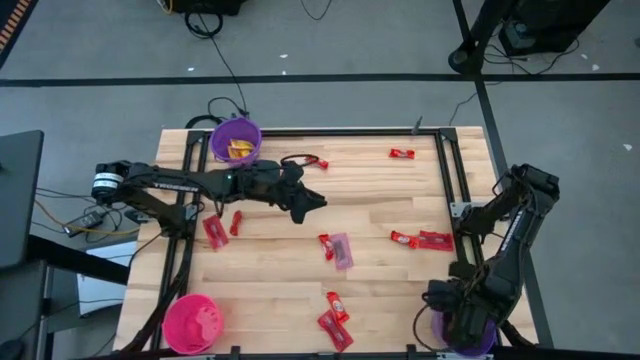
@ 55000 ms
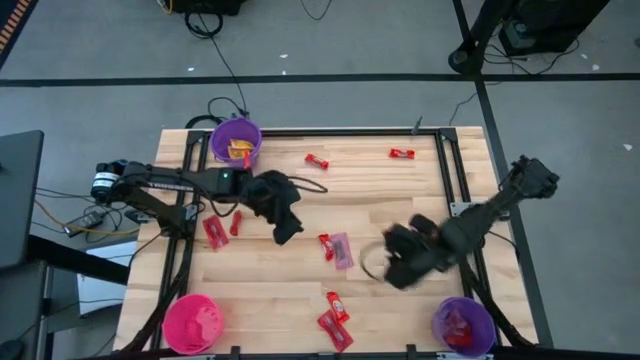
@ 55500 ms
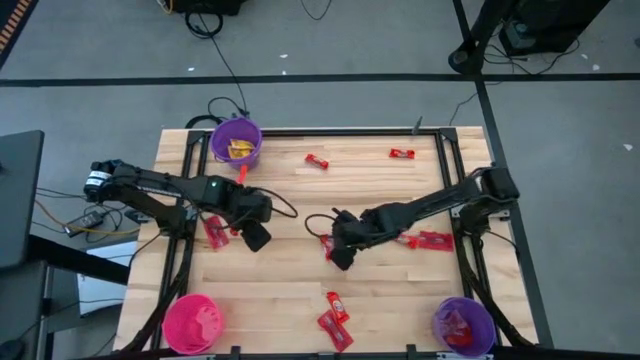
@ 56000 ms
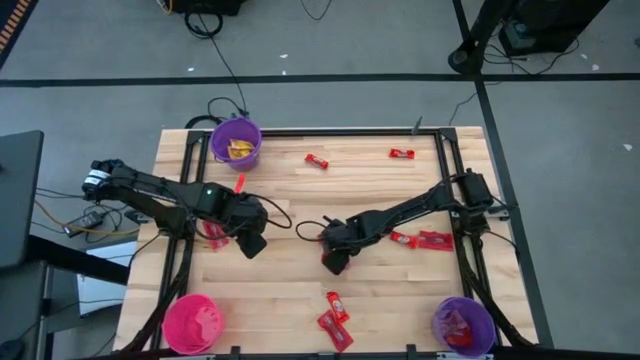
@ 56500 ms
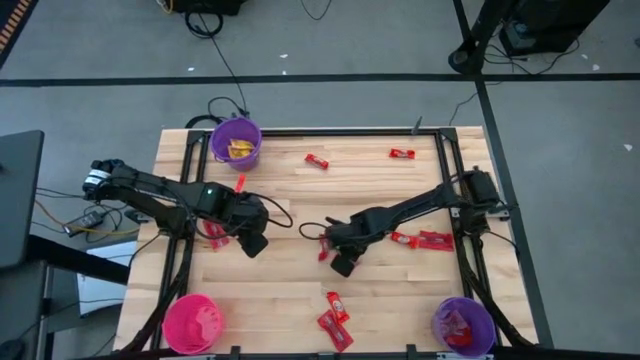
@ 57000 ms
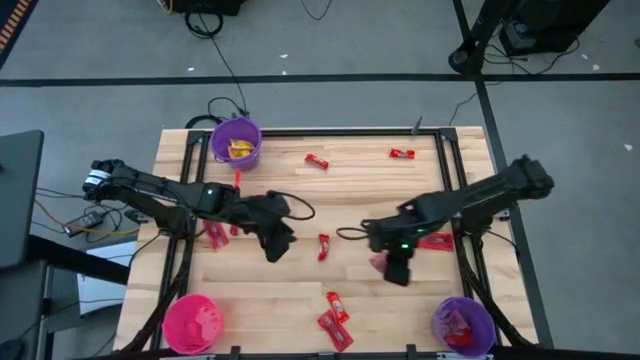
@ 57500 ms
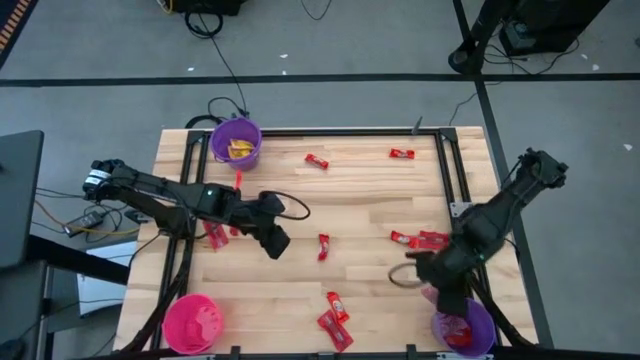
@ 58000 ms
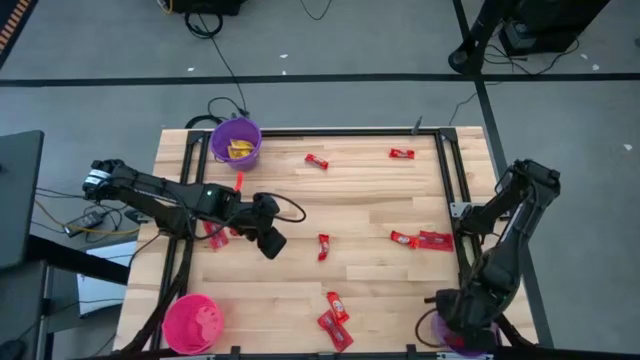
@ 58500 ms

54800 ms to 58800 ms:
Task: Sort candy by brand, put in halloween buckets
Put the red candy into the bottom purple bucket

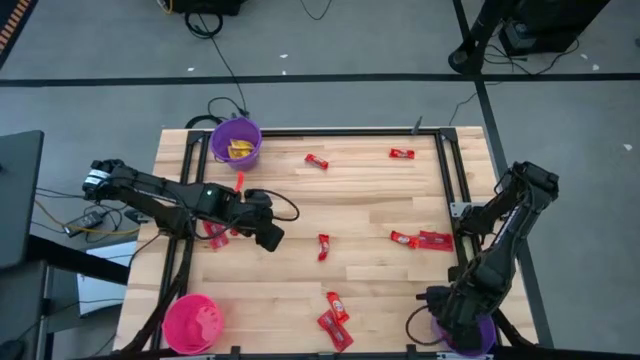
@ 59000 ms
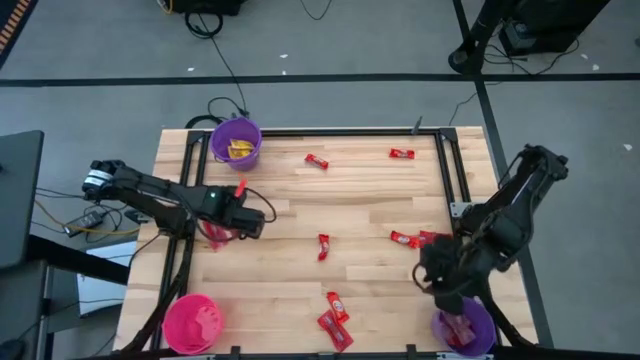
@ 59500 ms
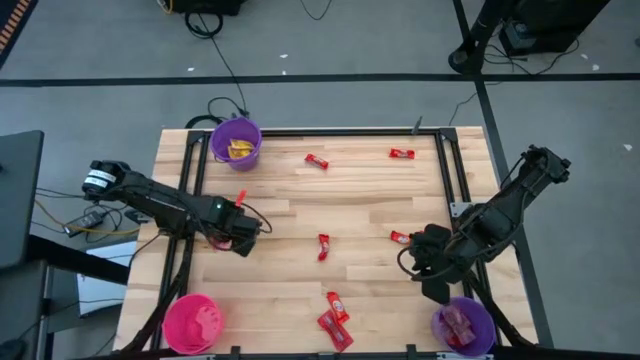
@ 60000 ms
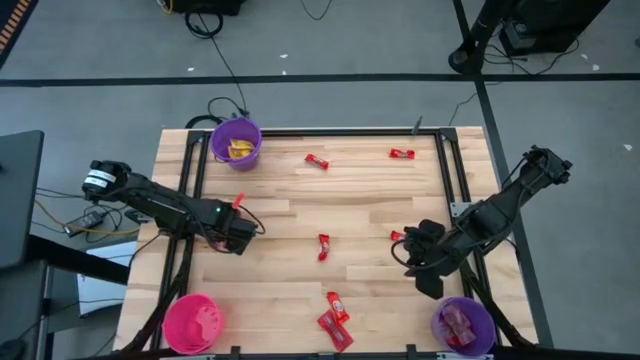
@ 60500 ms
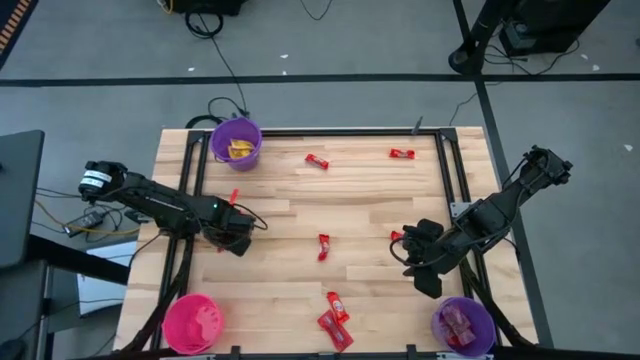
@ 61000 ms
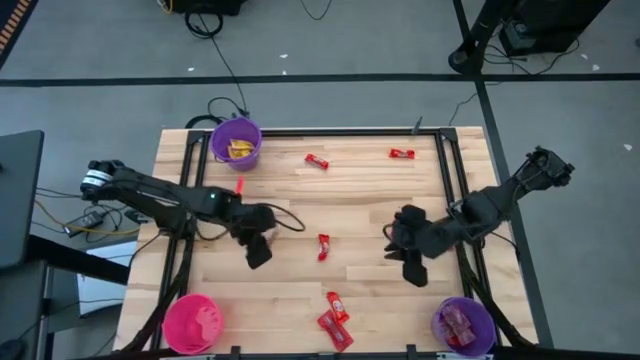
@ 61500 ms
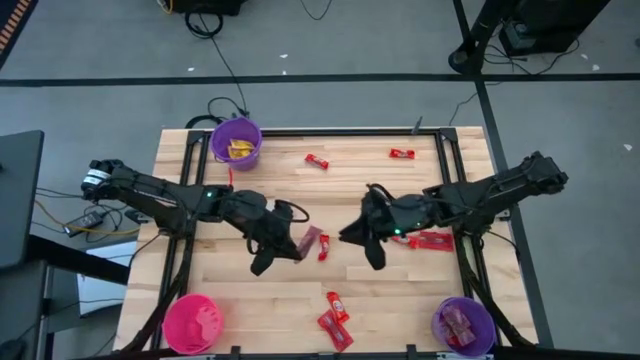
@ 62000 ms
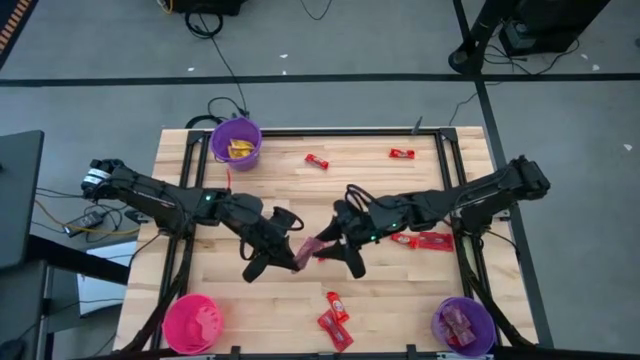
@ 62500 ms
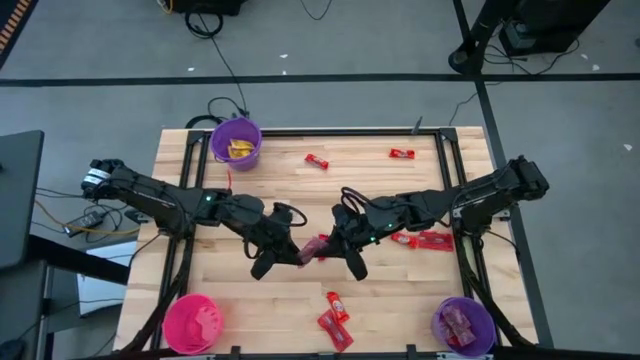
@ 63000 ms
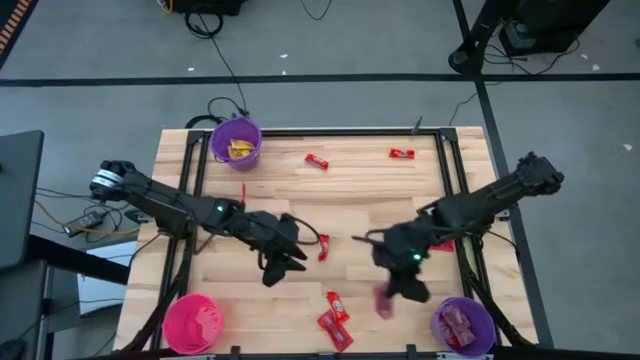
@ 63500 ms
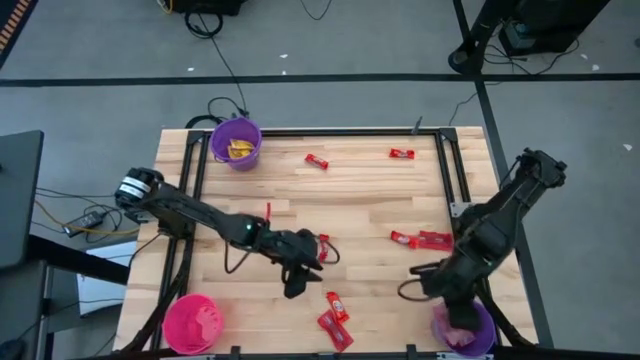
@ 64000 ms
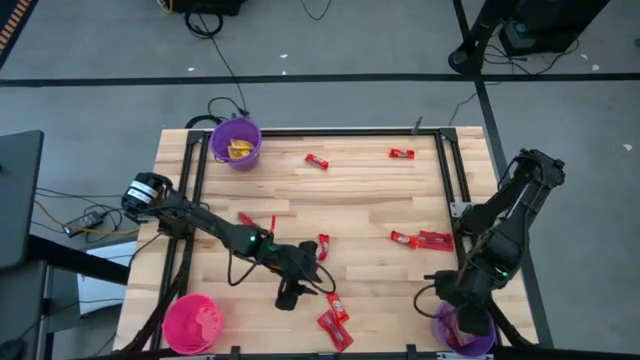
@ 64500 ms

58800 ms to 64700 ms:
Put the red candy into the bottom purple bucket

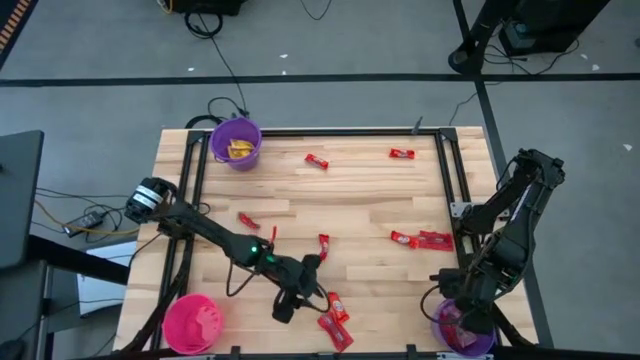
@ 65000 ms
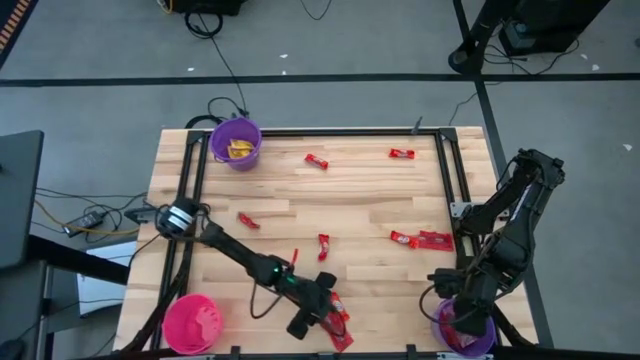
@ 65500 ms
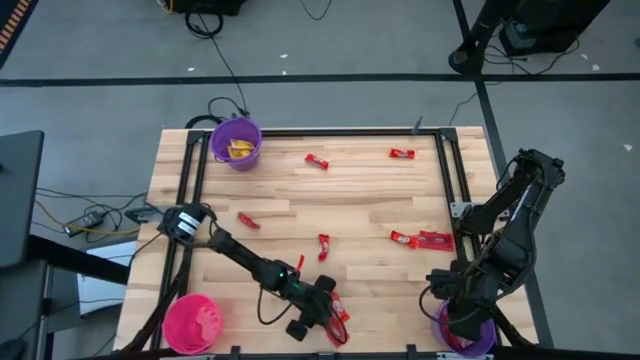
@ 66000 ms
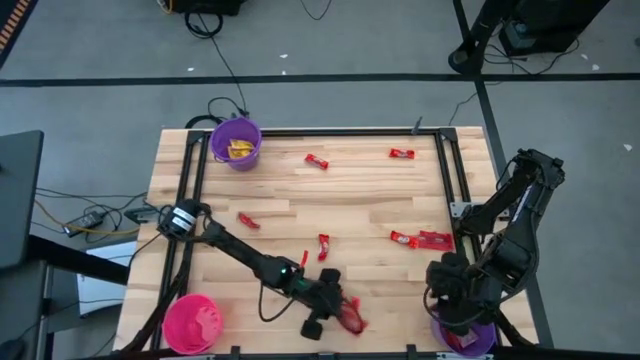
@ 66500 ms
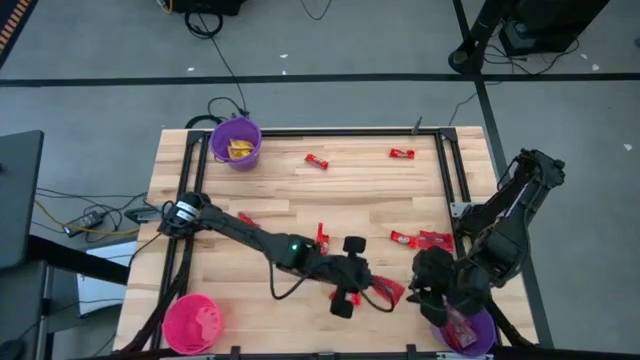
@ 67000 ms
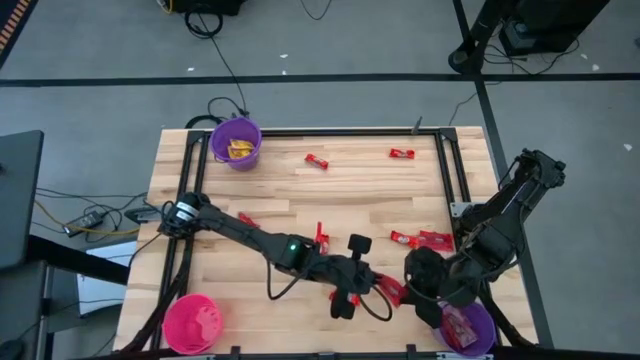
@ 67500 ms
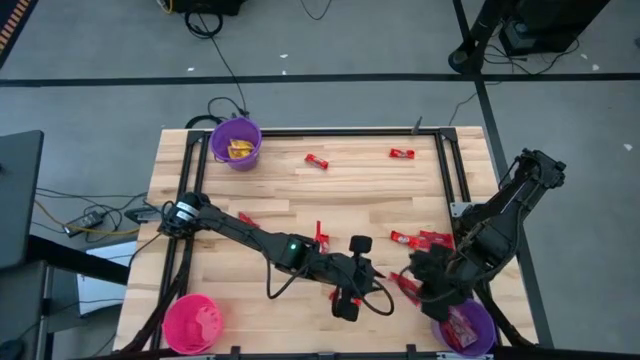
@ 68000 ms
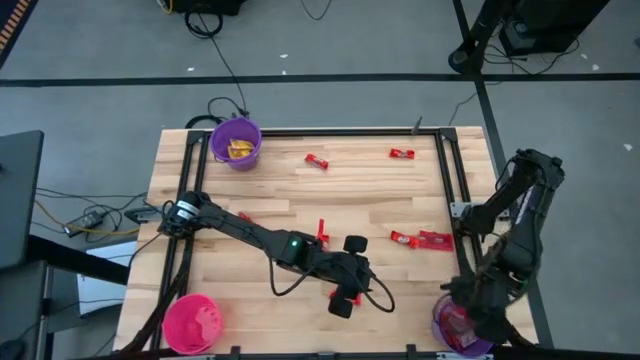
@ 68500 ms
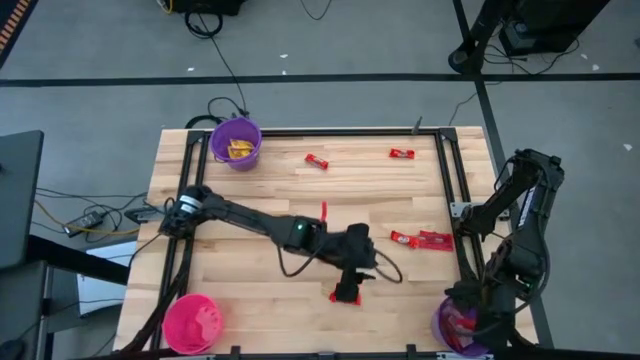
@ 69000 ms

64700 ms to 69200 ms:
Put the red candy into the bottom purple bucket

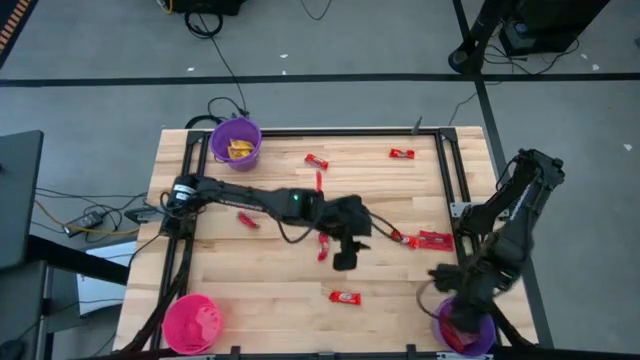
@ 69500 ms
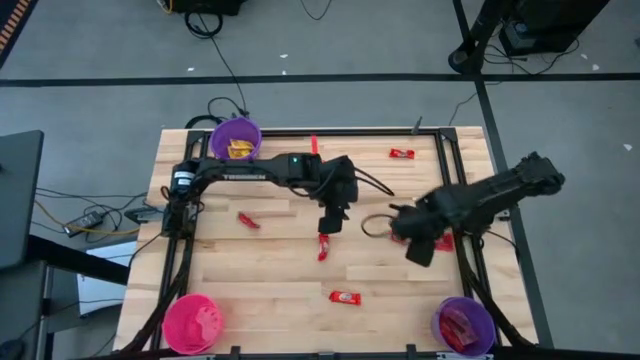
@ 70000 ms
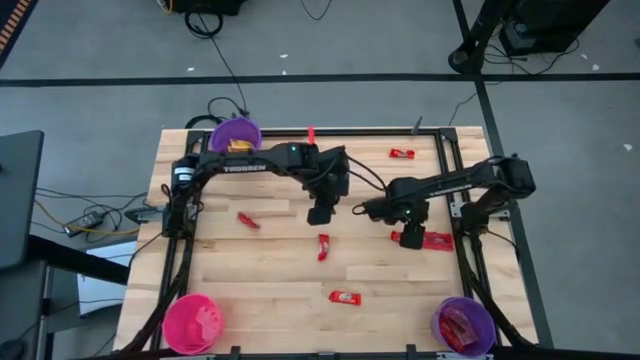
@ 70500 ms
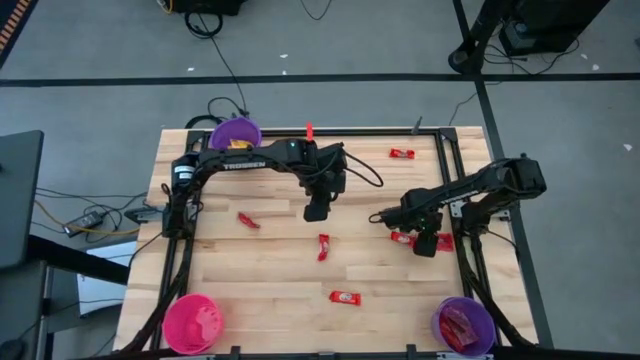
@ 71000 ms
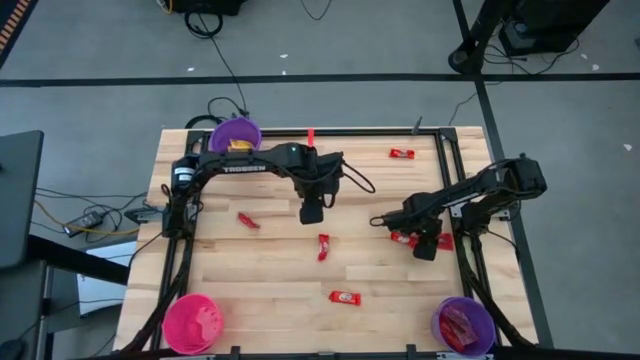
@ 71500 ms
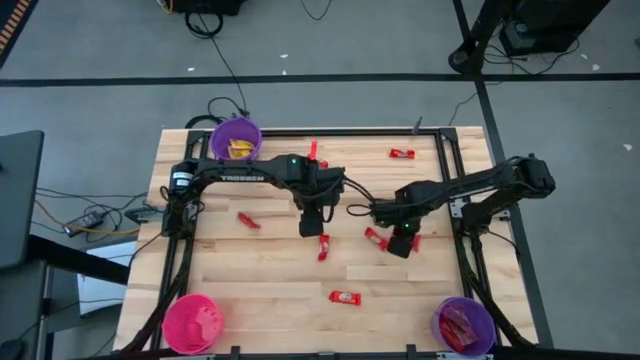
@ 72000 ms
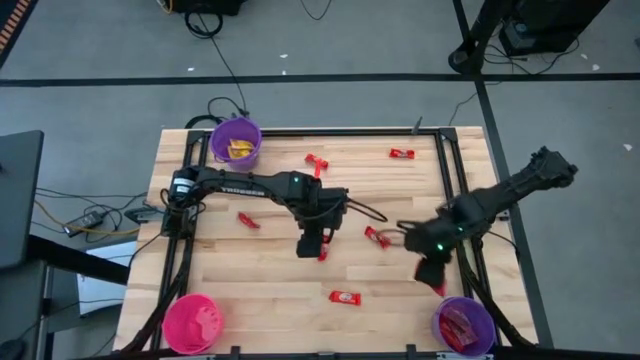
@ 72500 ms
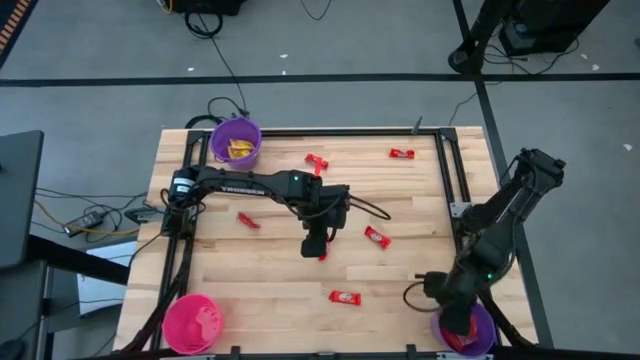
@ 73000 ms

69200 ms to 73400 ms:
Put the red candy into the bottom purple bucket

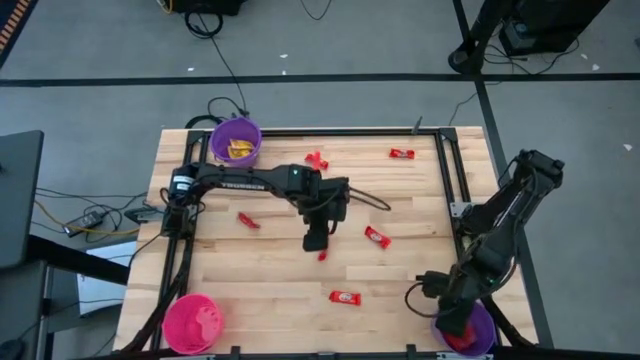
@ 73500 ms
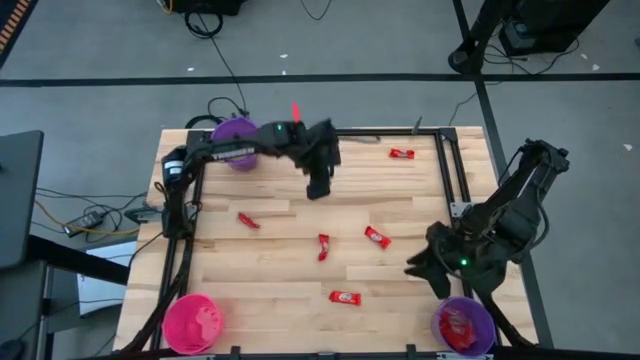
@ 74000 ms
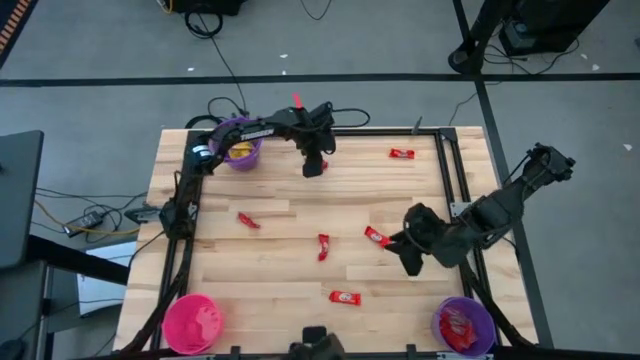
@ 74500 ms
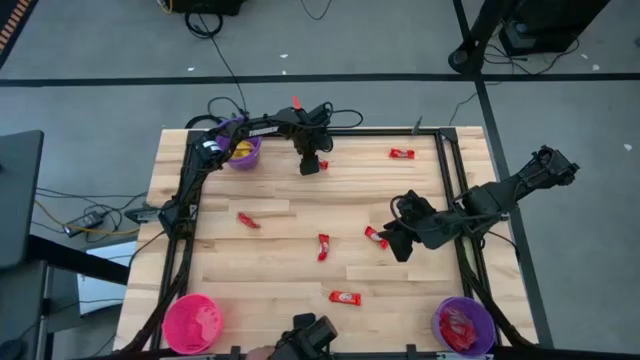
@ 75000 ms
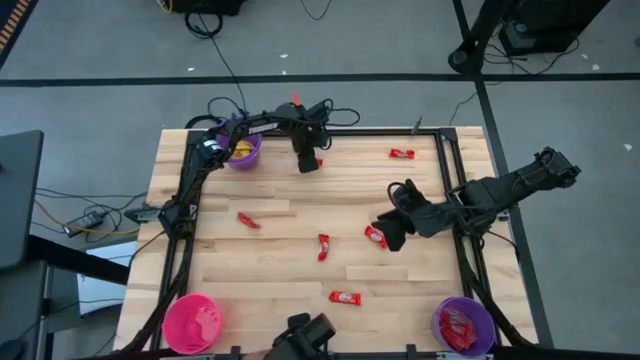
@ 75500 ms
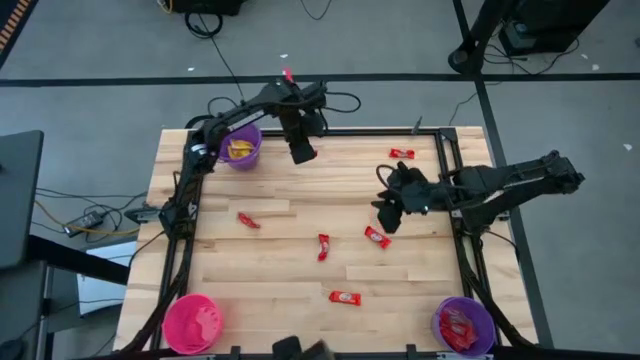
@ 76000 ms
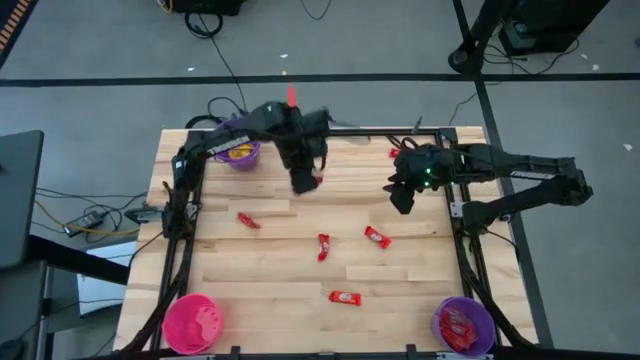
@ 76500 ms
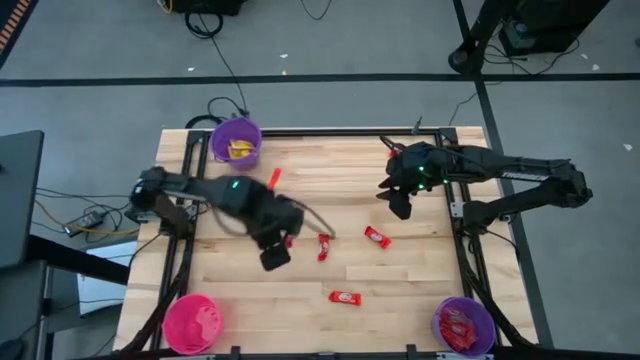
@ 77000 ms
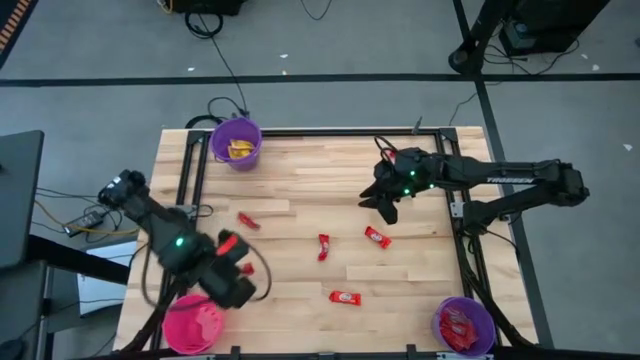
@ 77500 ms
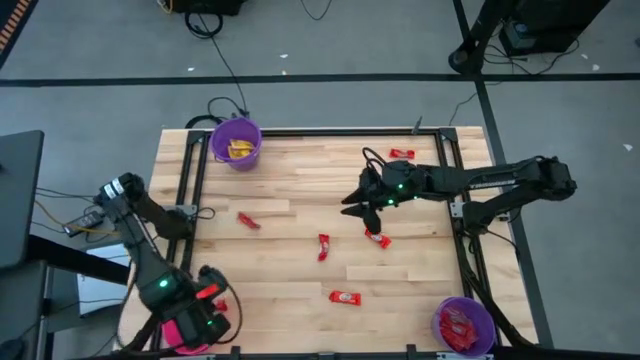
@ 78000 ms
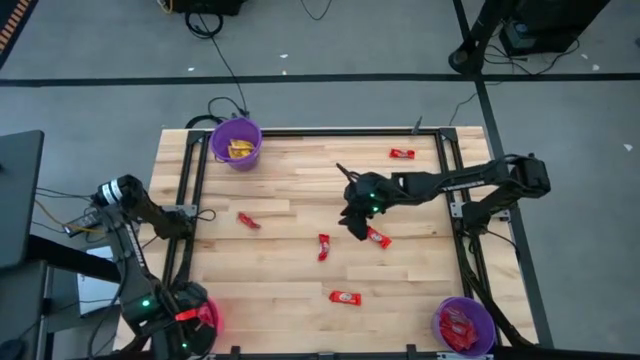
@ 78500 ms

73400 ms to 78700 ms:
Put the red chocolate into the pink bucket
